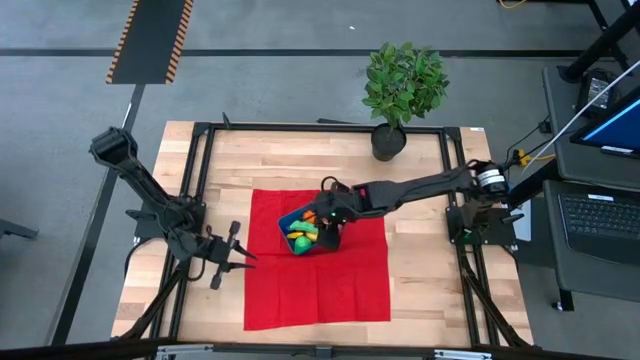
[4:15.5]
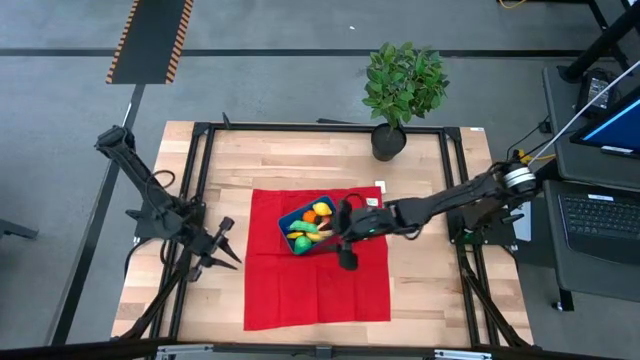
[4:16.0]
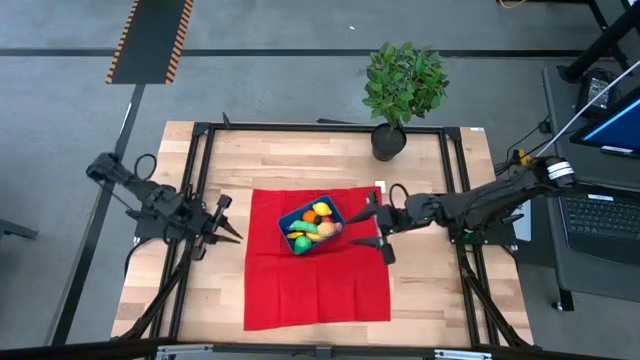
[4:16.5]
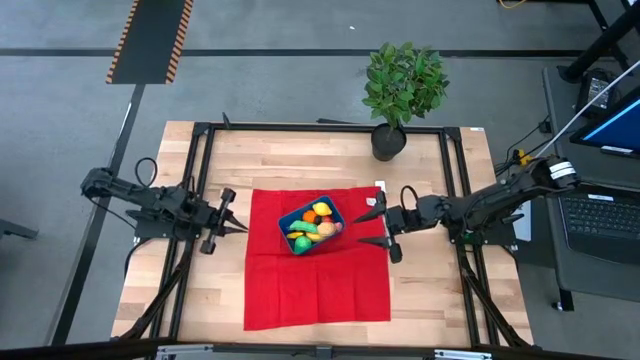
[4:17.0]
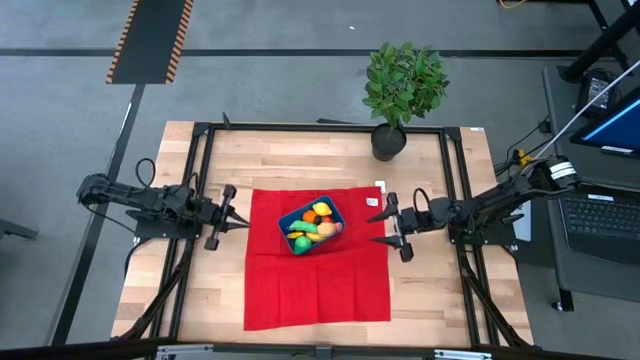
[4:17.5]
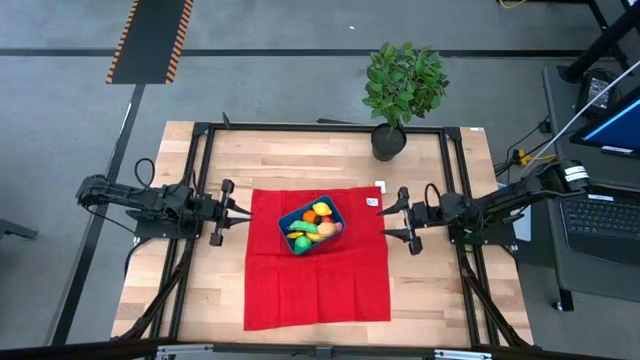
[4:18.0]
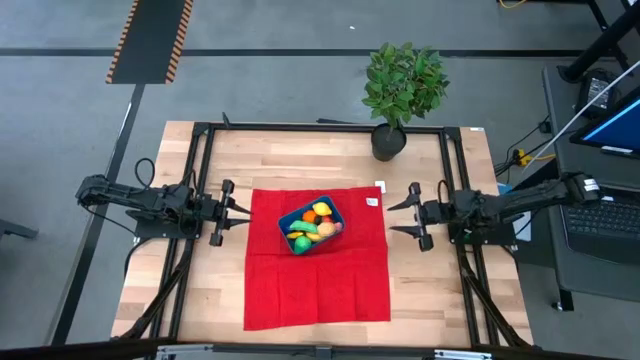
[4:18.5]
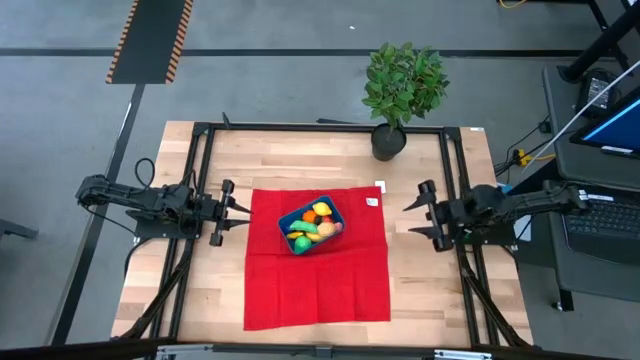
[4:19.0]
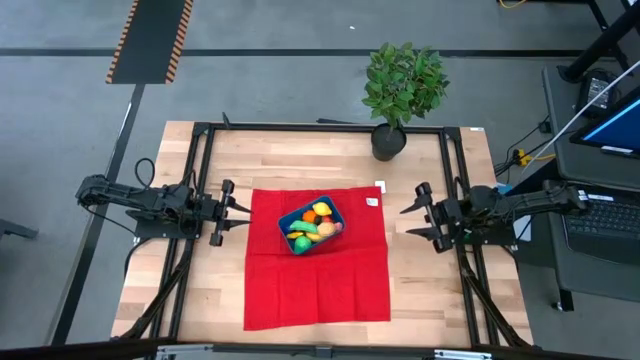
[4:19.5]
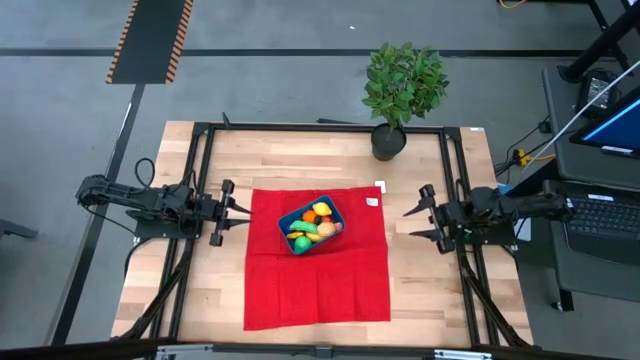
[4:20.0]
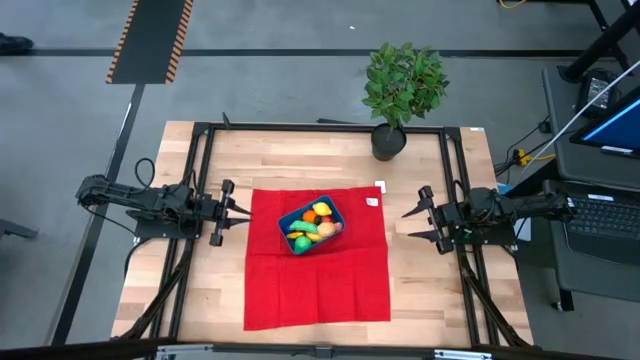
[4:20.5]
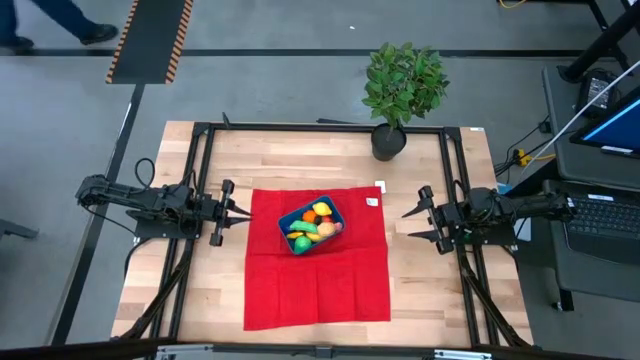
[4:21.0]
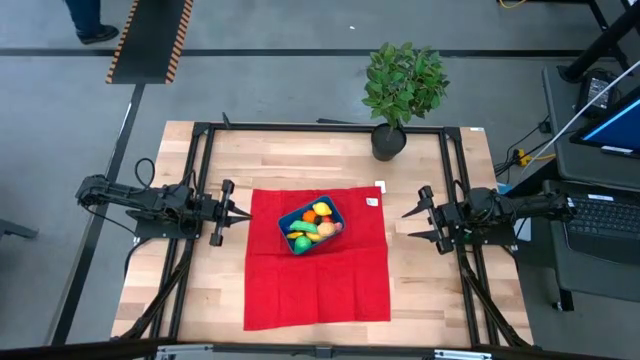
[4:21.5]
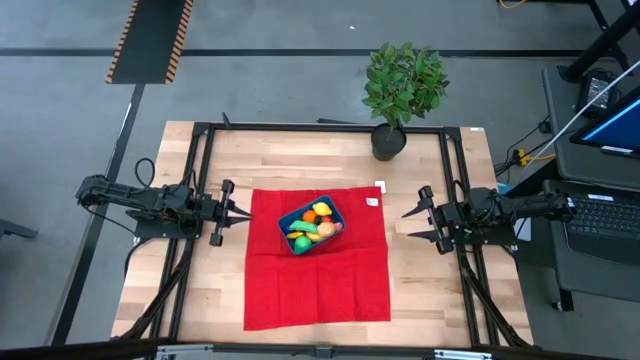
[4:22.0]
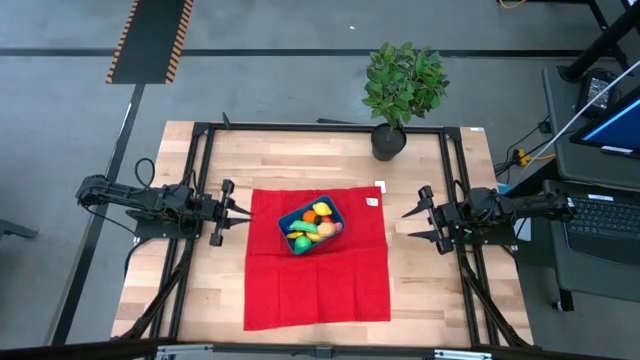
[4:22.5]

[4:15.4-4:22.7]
Task: Pick and placing Produce into tupperware
Return to Home Position

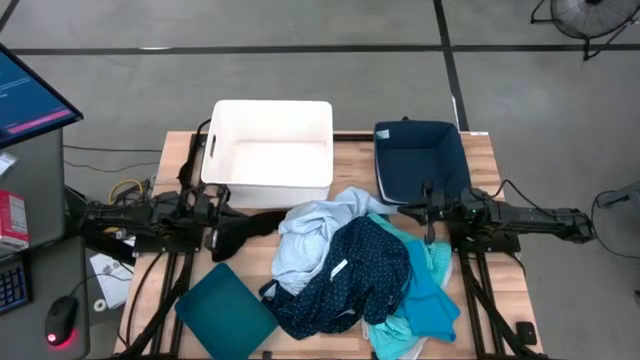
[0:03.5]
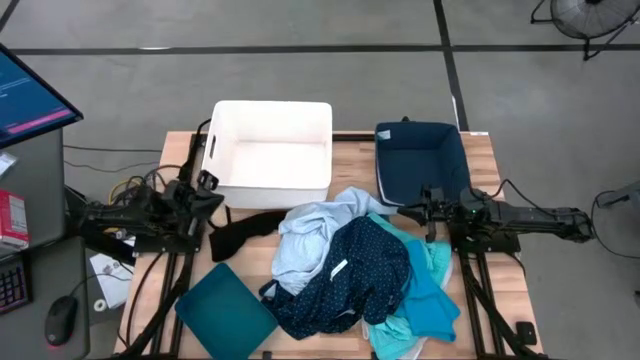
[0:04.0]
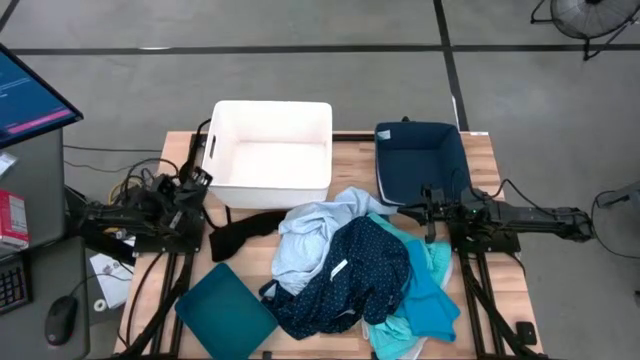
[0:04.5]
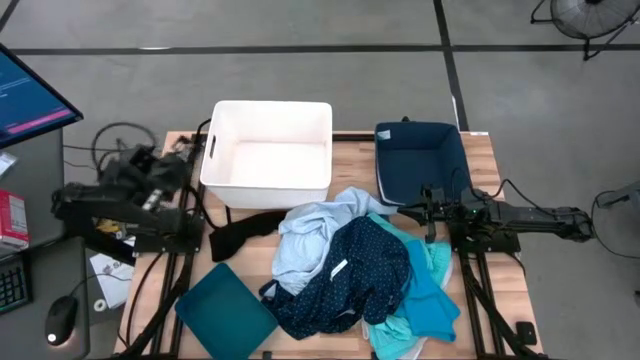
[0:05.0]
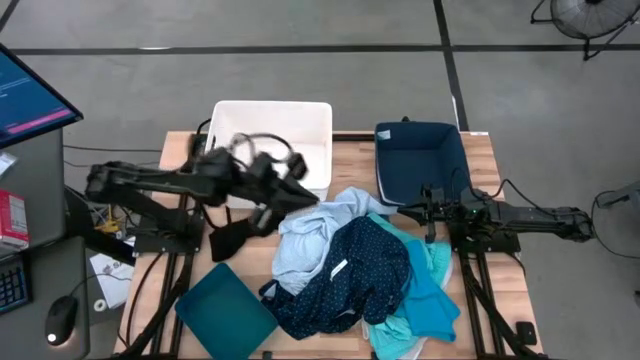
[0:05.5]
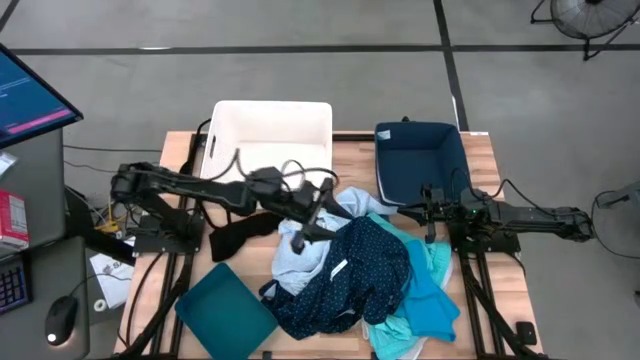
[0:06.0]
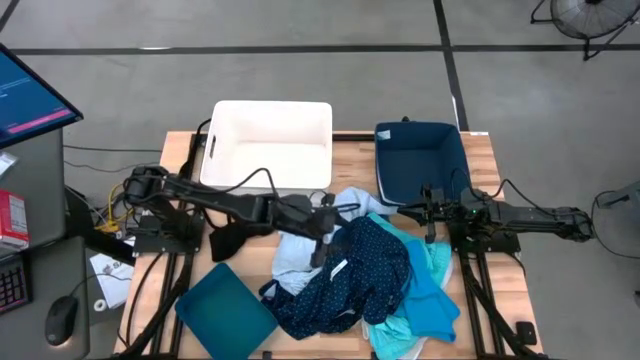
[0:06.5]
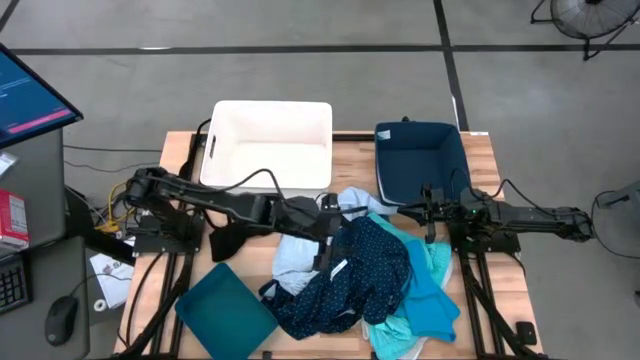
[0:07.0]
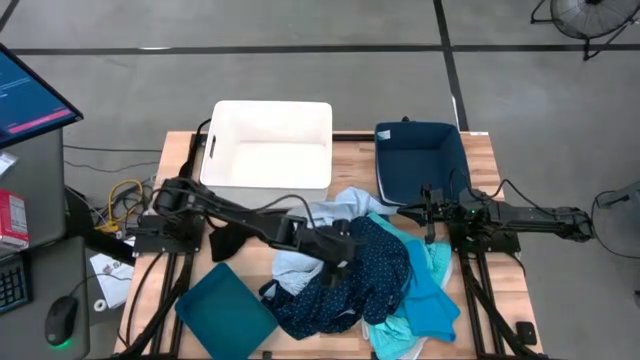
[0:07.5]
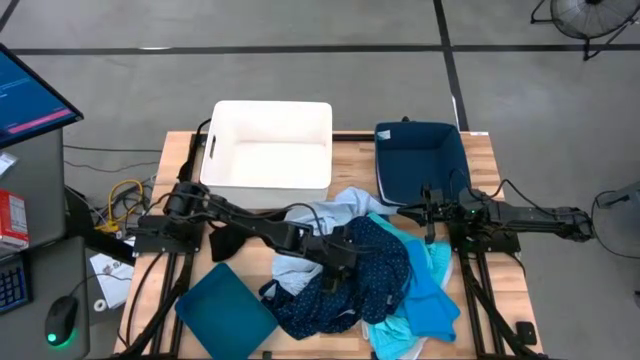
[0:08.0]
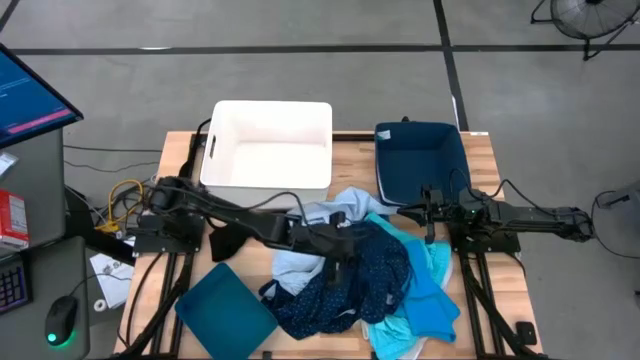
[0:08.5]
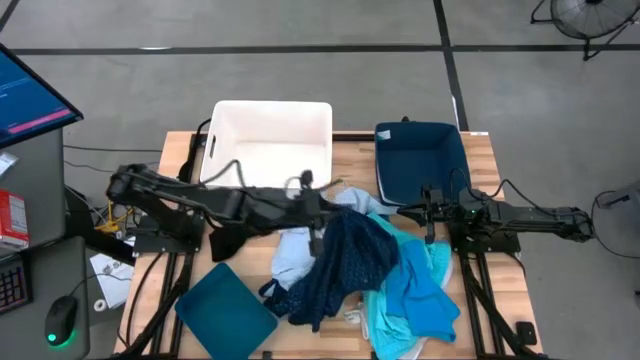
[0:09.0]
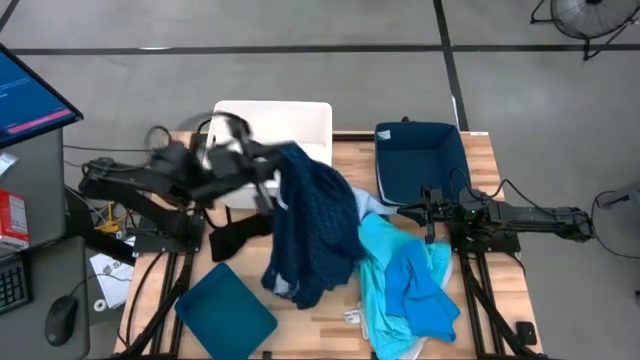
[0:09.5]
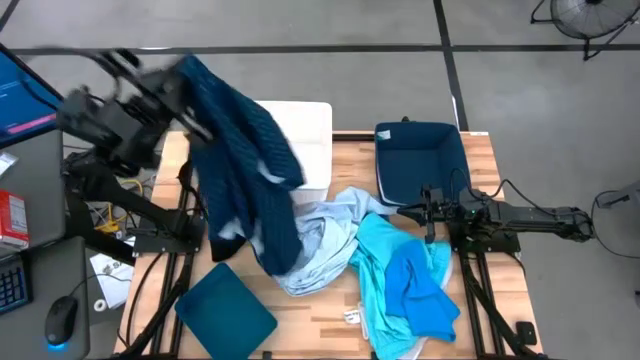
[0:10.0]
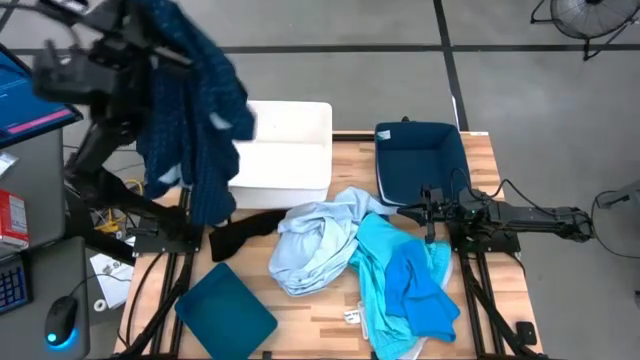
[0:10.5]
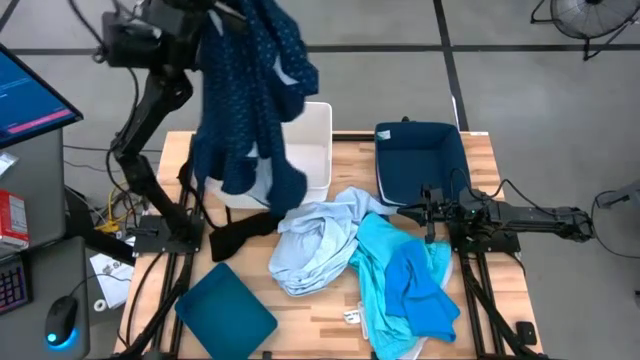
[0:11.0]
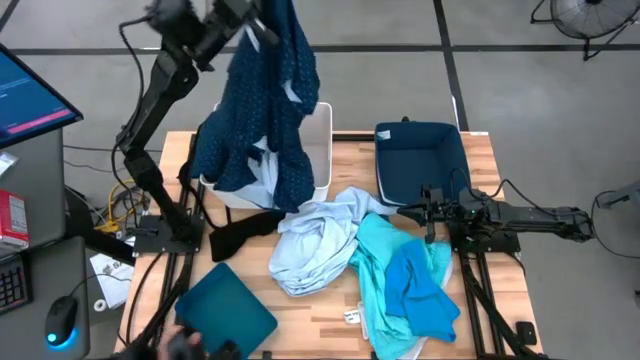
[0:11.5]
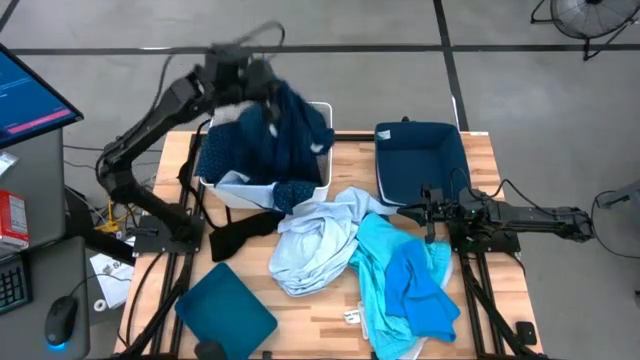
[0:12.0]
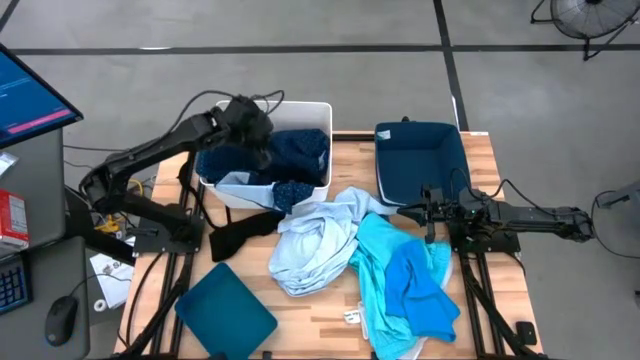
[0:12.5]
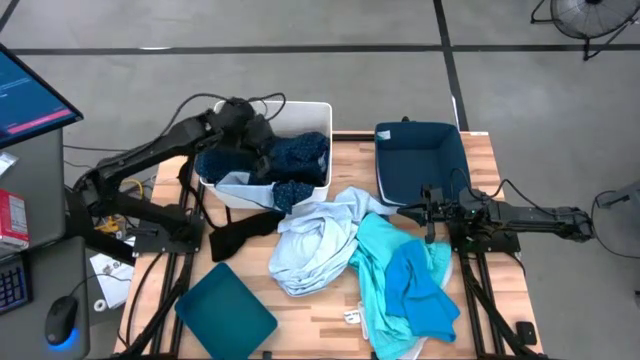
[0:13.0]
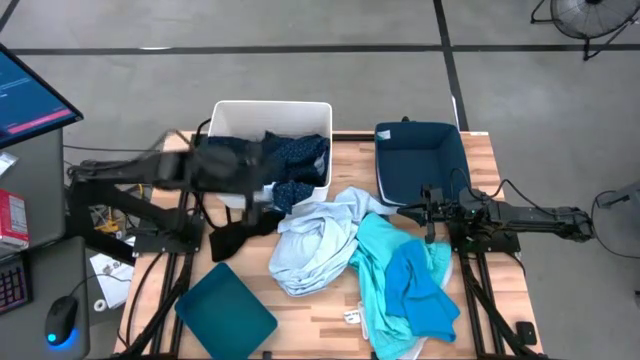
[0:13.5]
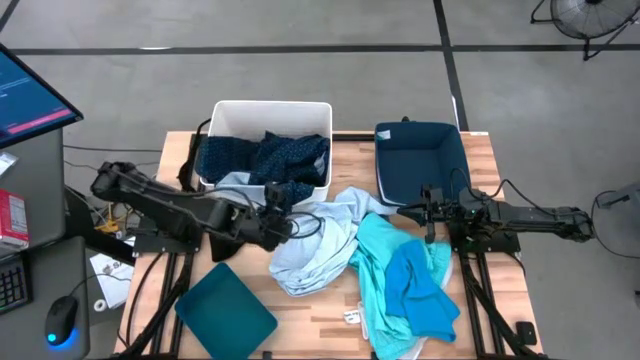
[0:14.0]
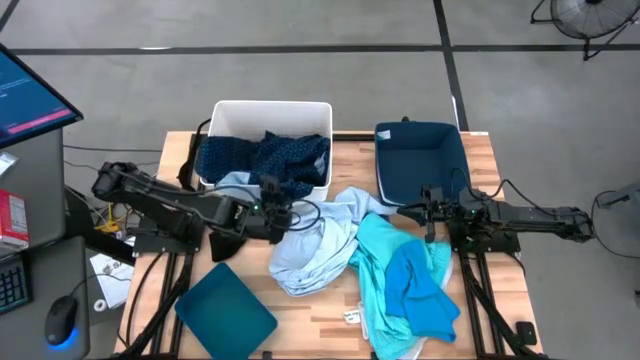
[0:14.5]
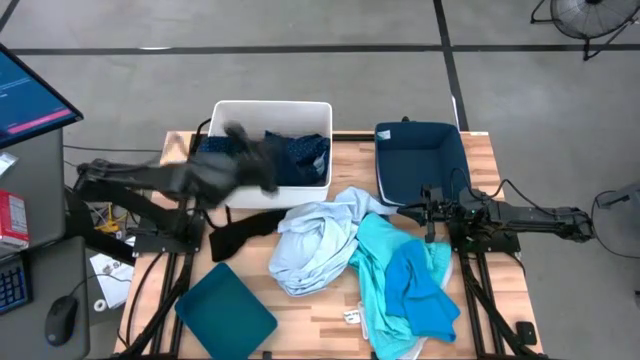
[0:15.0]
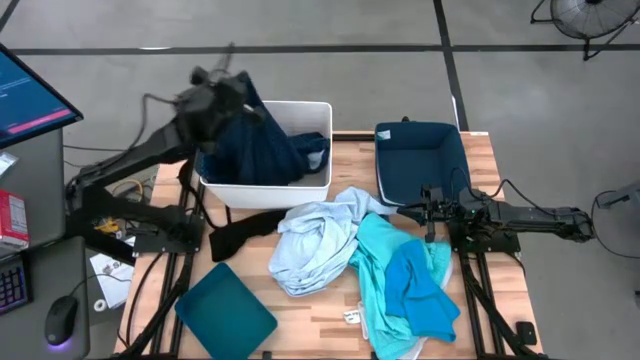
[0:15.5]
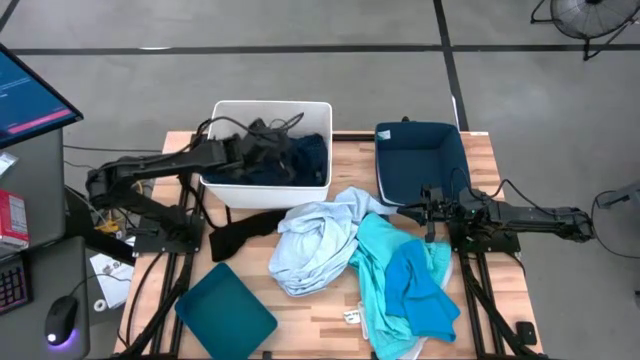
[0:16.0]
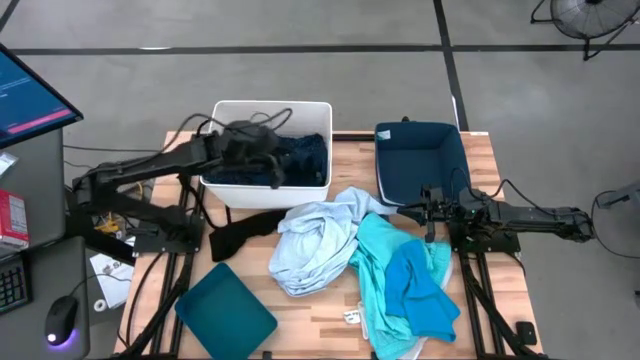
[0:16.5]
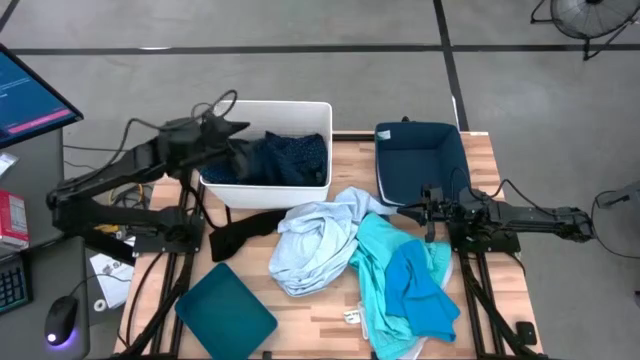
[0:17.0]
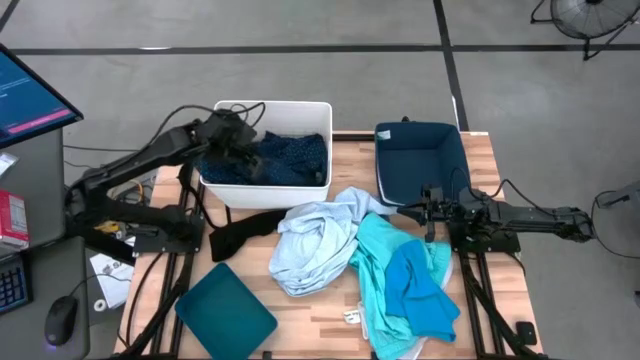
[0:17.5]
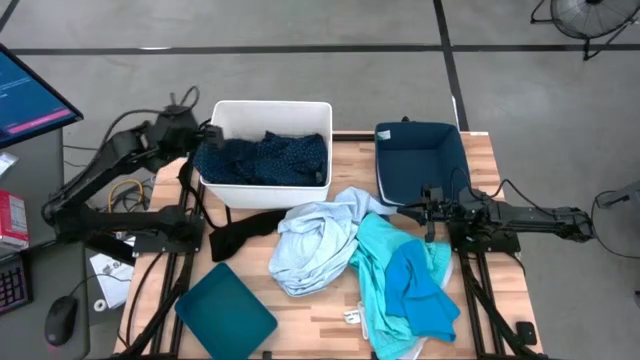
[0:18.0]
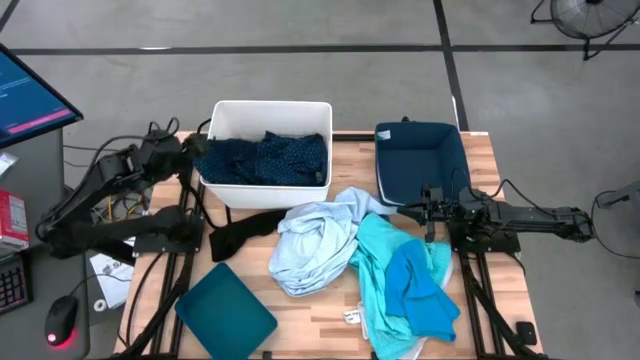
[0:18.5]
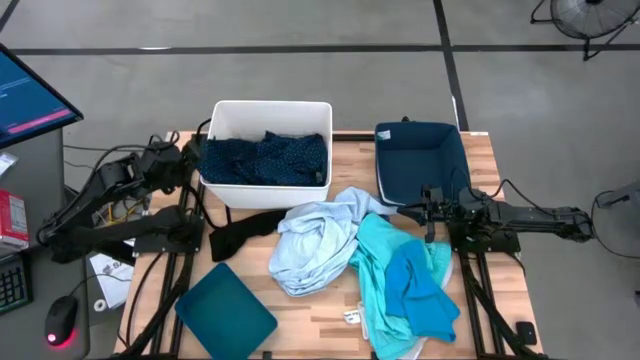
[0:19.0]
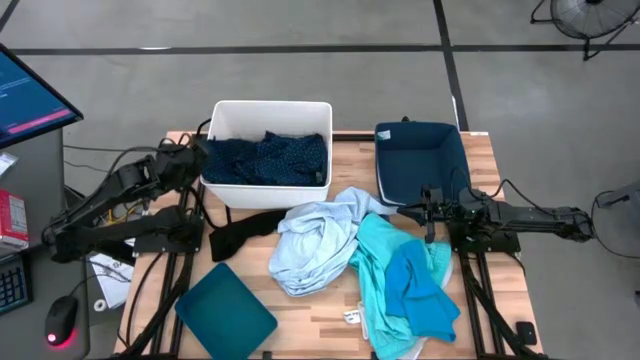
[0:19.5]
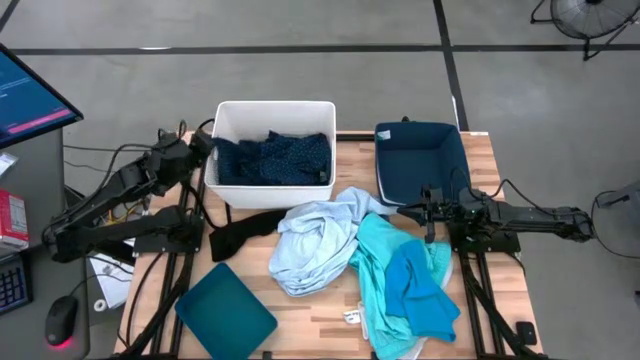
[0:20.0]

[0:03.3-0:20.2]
Task: Pick & Place Cloths
Put the dark blue patterned shirt into the white bin
